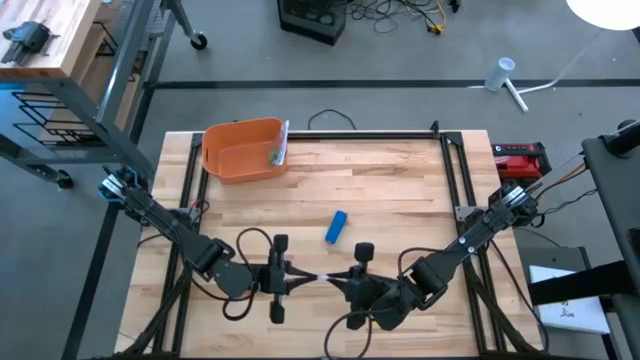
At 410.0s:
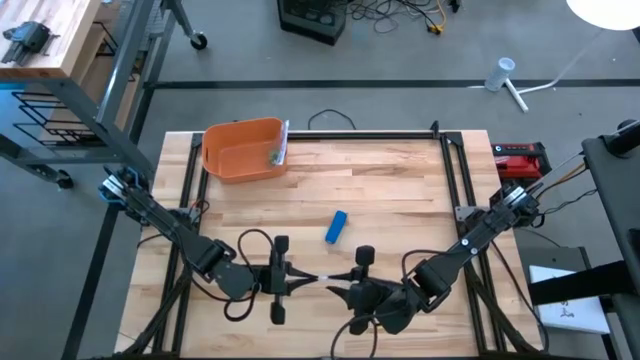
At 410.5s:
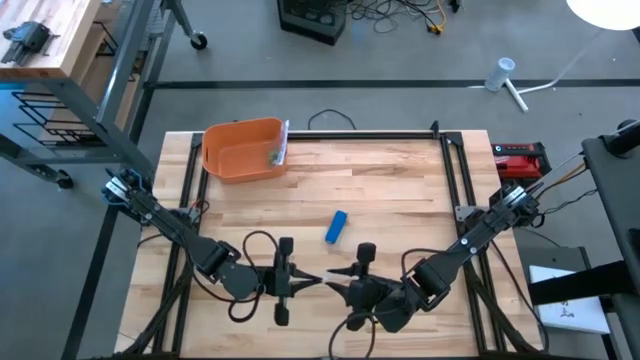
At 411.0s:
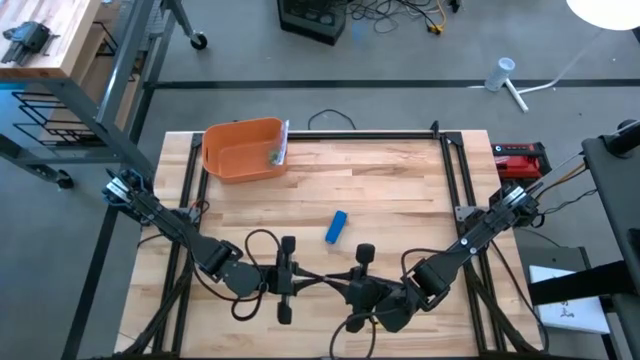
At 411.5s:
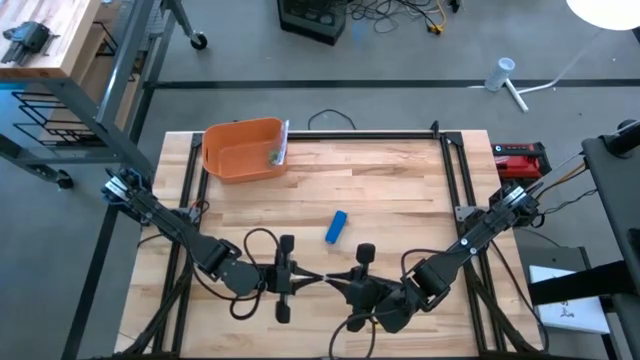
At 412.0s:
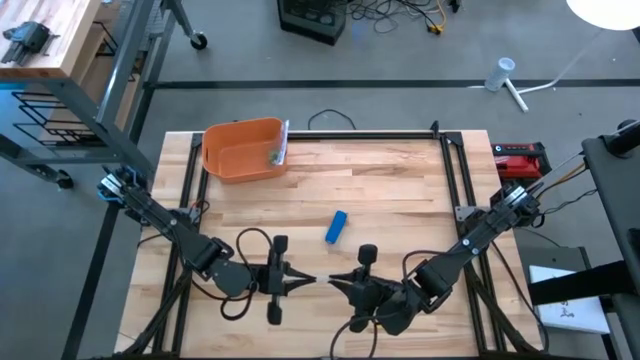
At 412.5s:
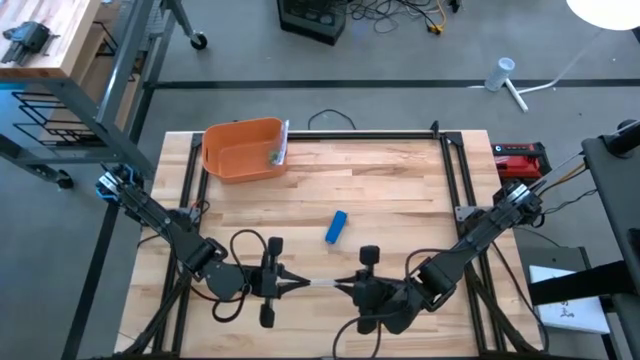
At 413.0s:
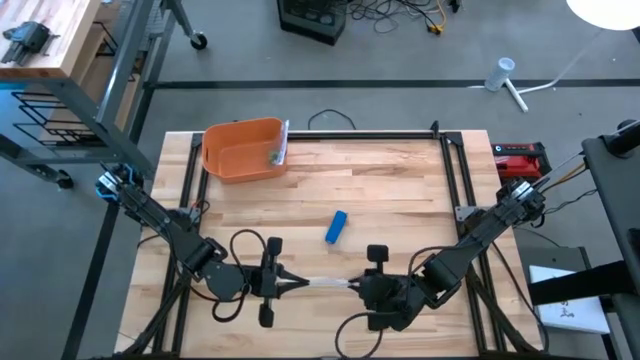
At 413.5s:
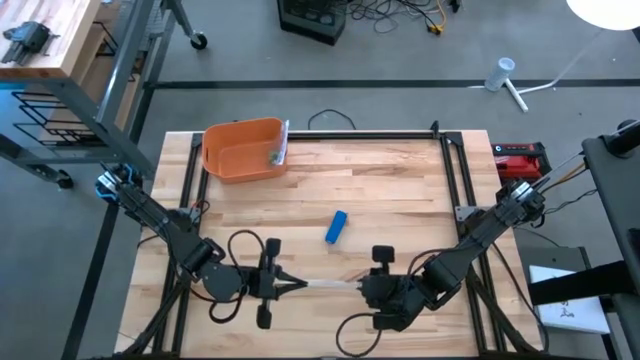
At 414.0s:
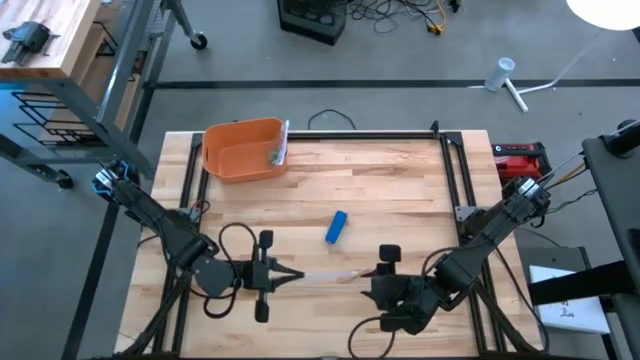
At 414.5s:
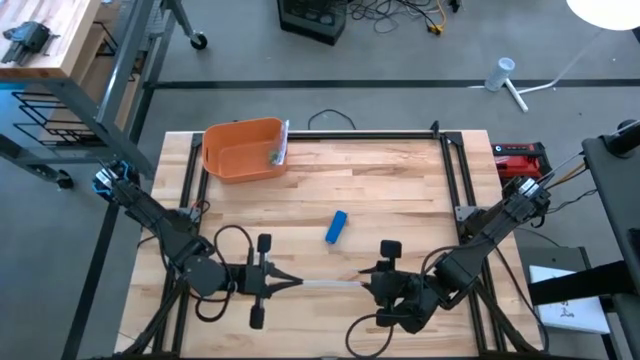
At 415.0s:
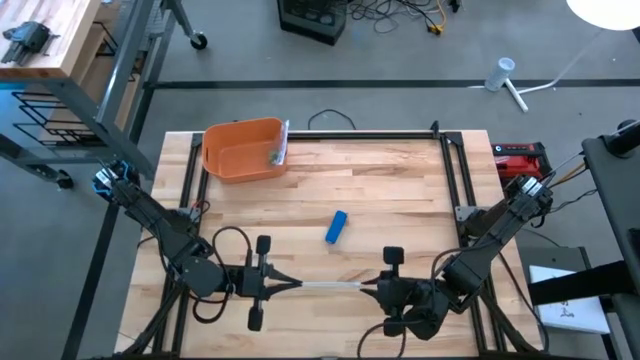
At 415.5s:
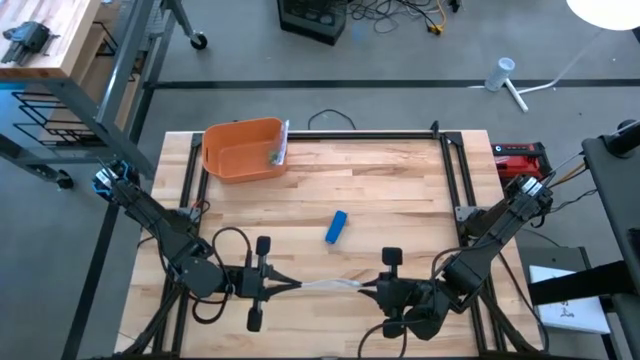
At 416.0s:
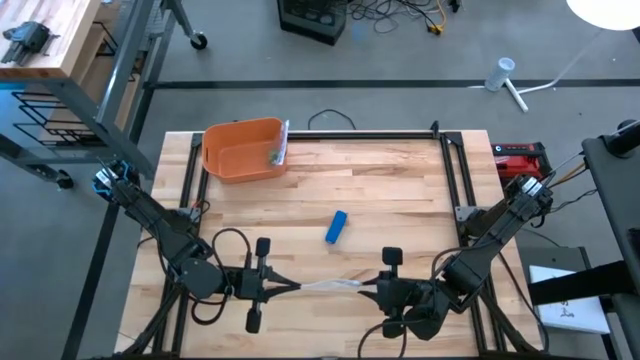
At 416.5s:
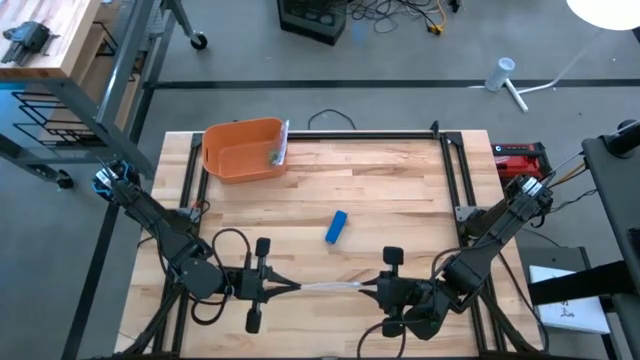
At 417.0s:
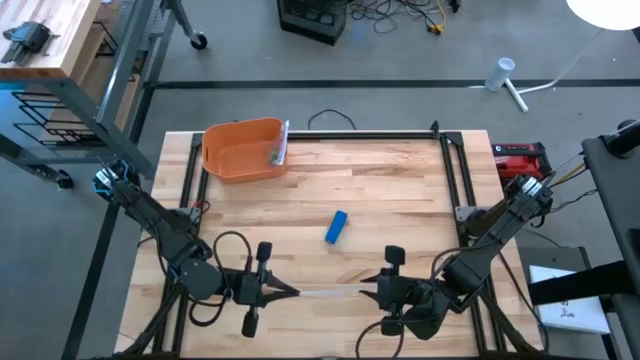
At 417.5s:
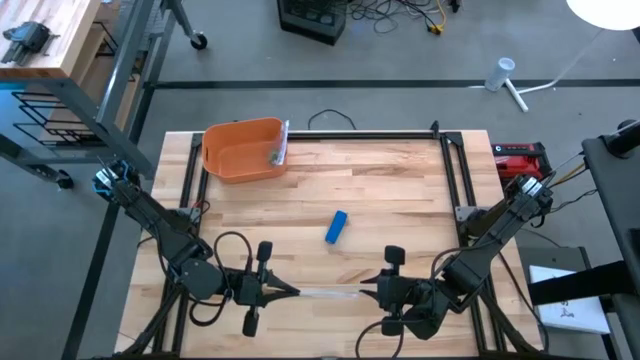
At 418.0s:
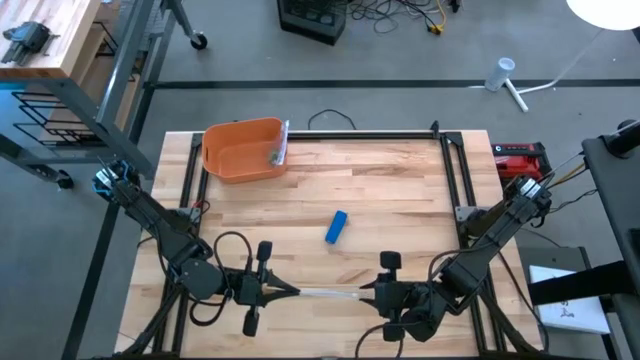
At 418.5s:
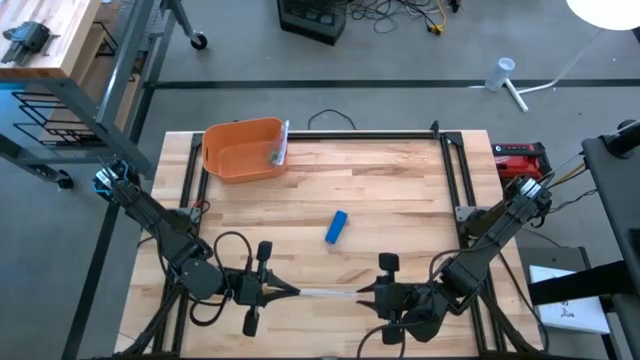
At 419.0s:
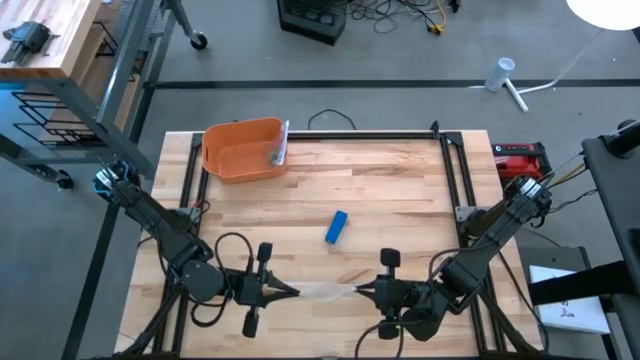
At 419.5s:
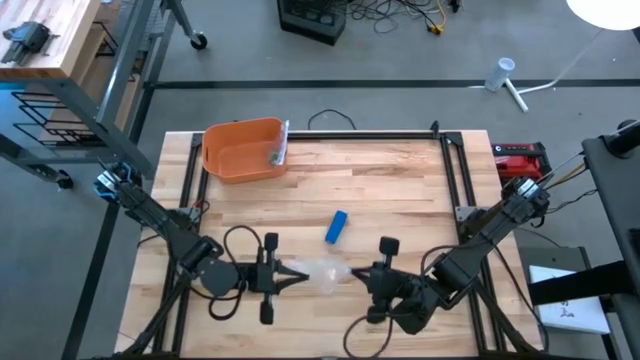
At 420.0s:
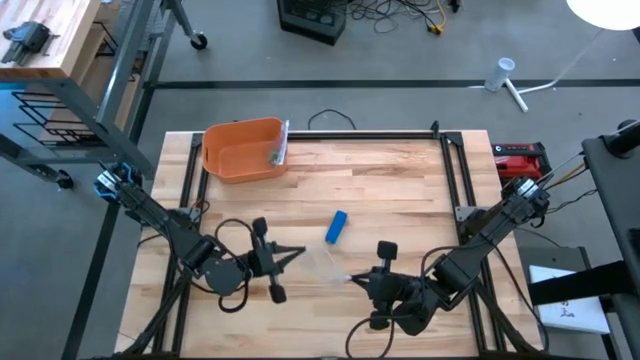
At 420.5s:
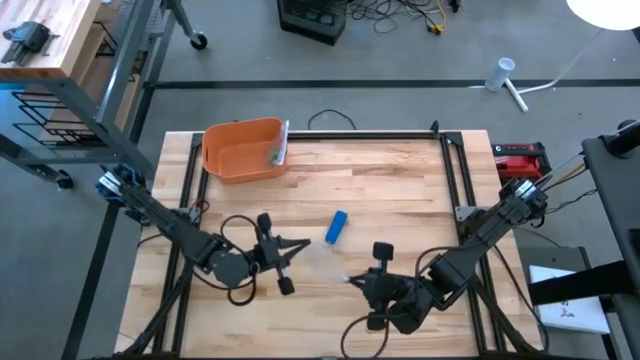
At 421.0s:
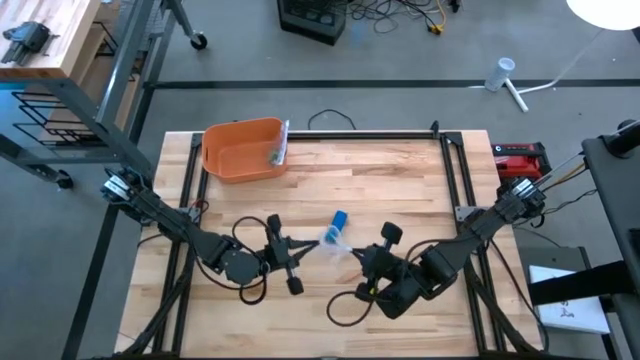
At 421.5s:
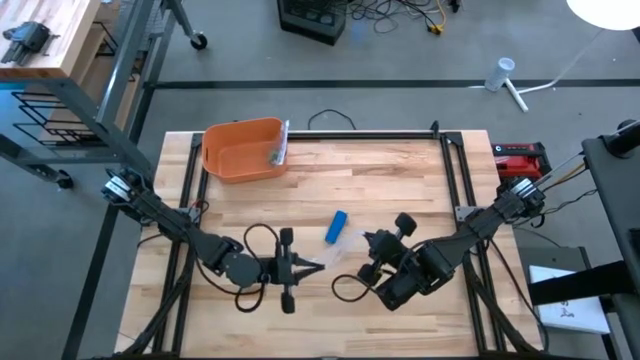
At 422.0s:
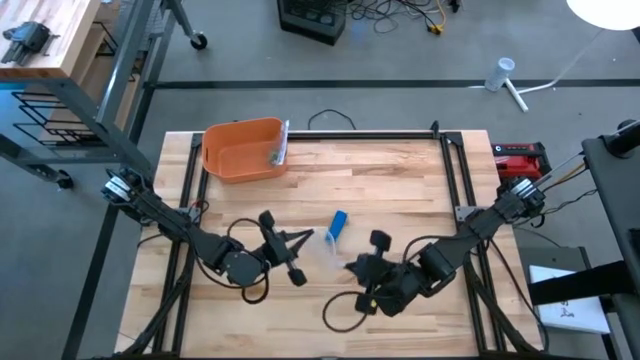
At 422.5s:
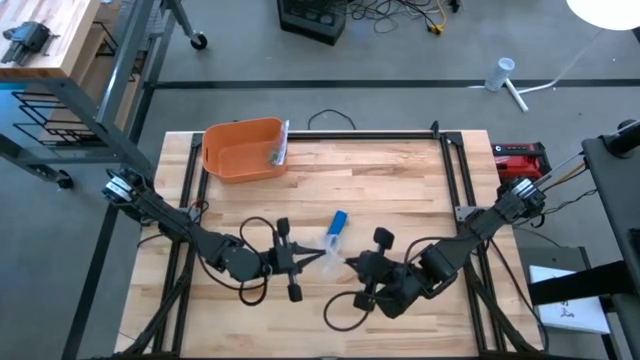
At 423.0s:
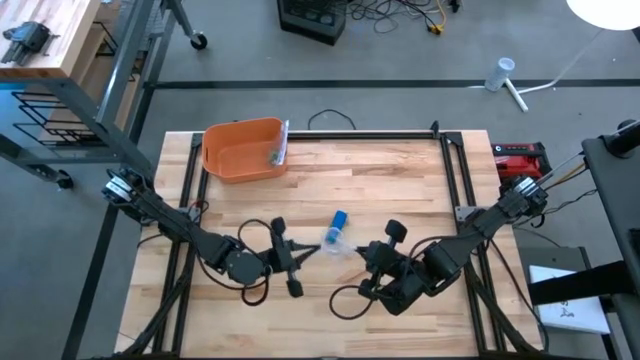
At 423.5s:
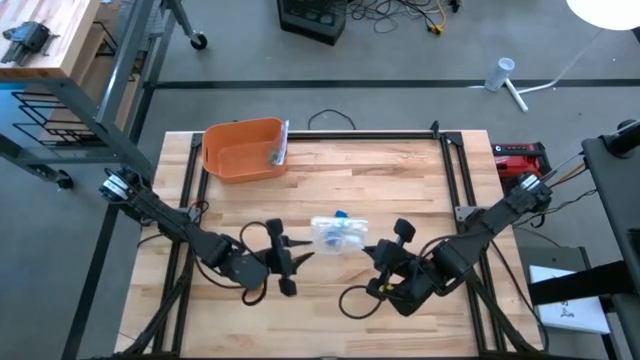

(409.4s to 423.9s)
Task: Roll bandage
Open the transparent zip bag

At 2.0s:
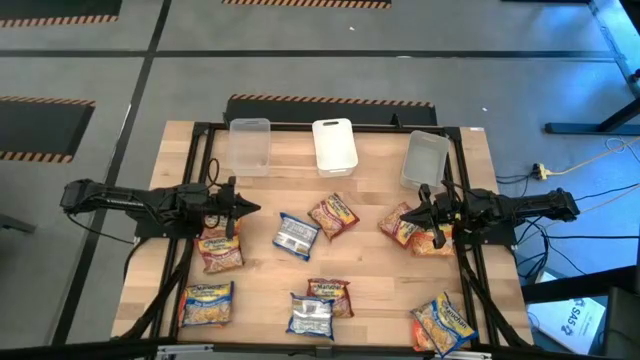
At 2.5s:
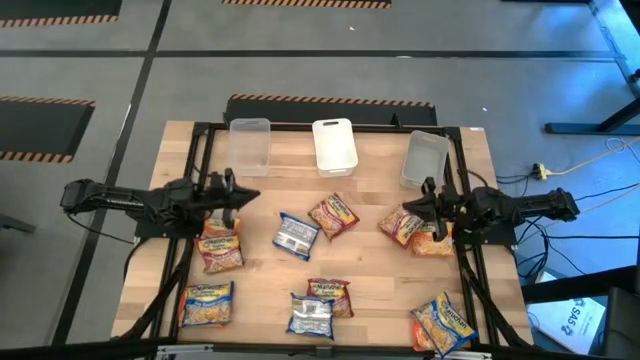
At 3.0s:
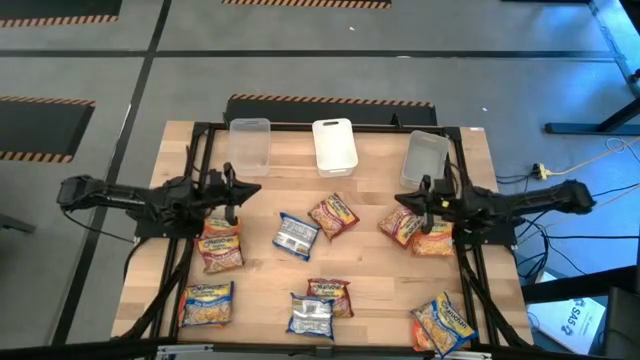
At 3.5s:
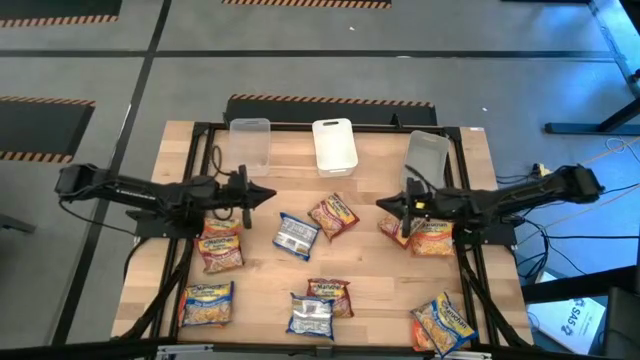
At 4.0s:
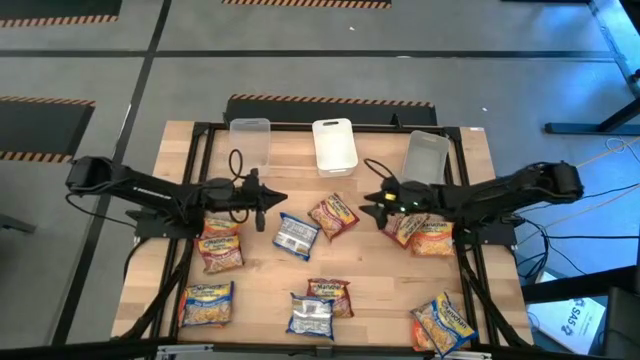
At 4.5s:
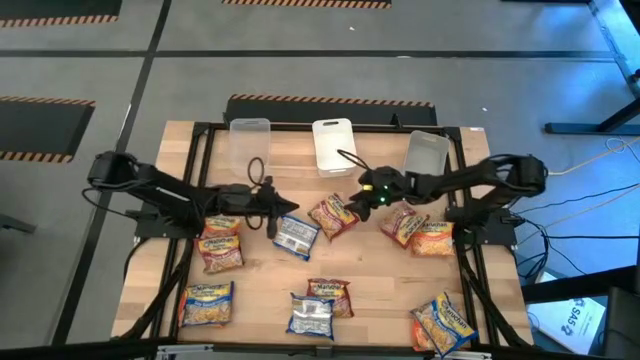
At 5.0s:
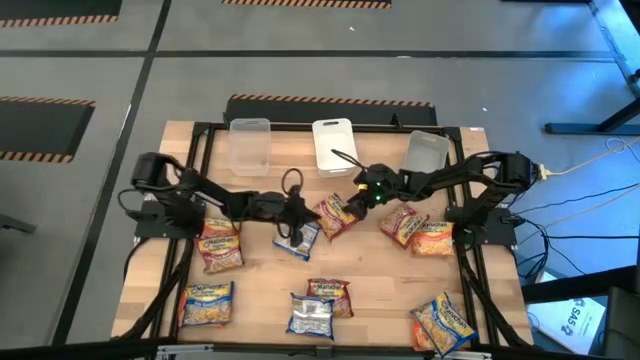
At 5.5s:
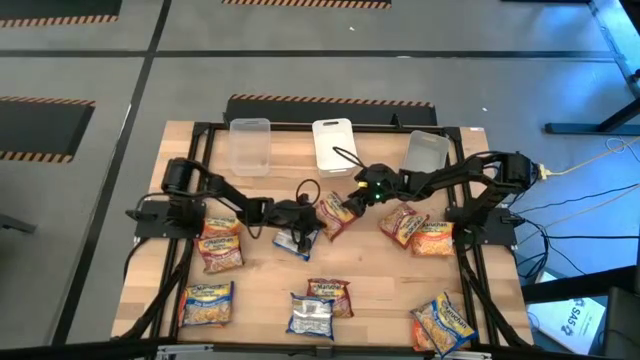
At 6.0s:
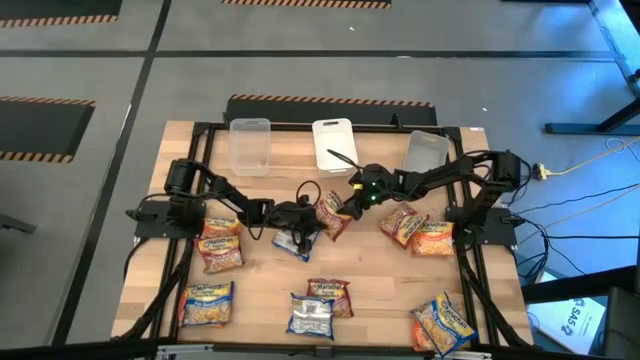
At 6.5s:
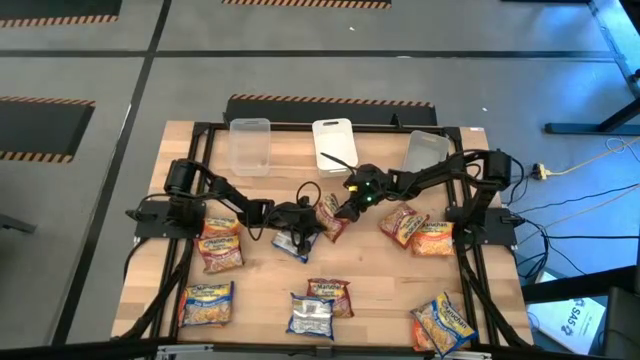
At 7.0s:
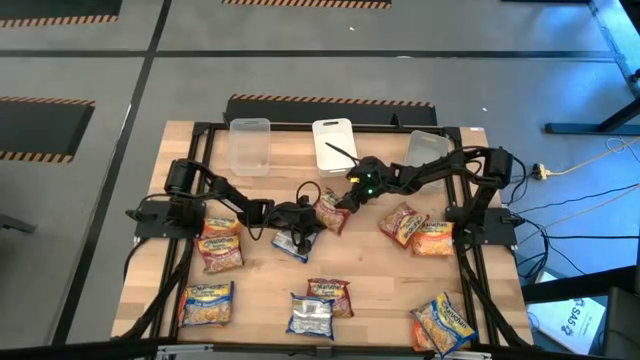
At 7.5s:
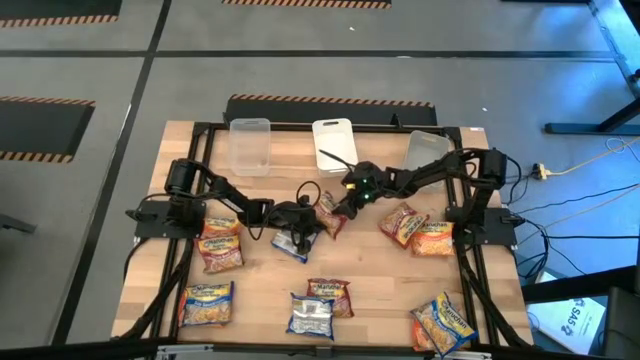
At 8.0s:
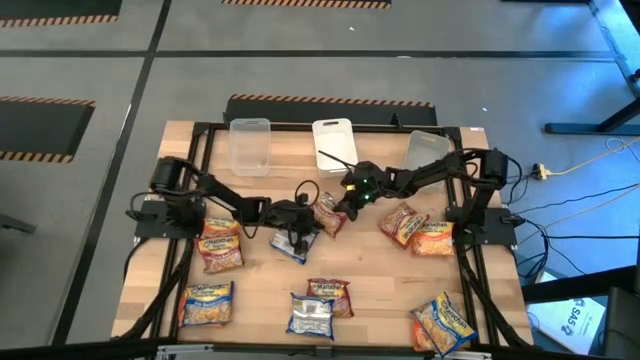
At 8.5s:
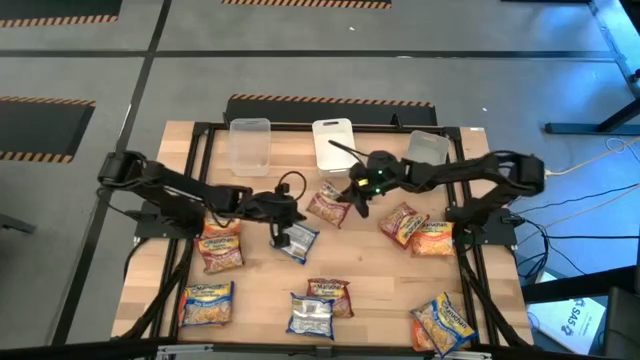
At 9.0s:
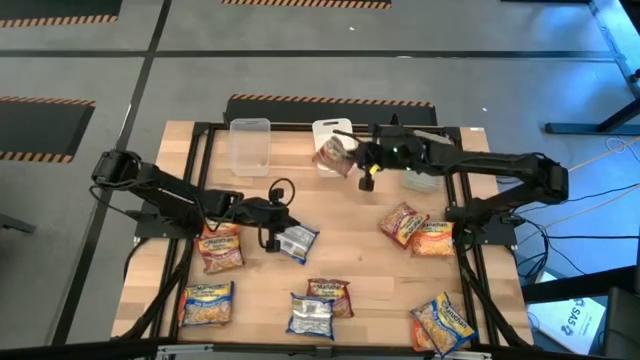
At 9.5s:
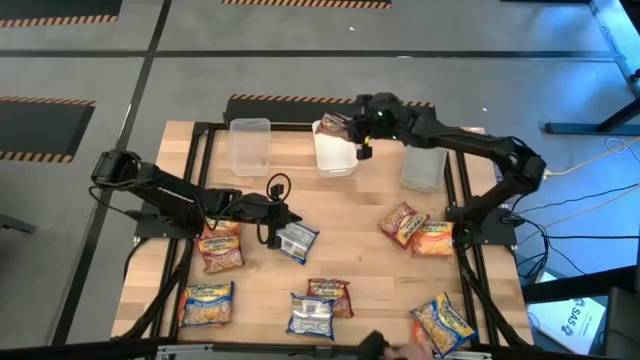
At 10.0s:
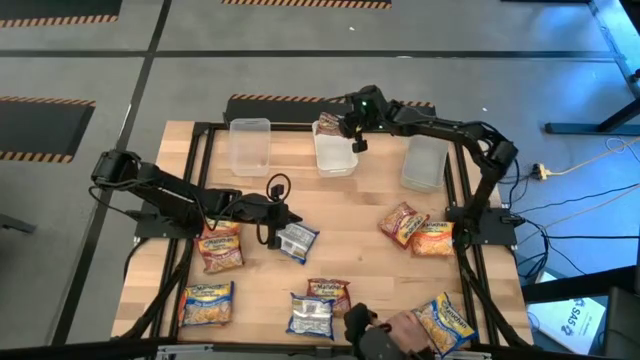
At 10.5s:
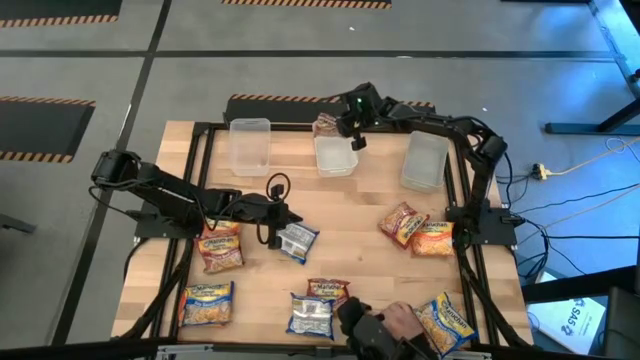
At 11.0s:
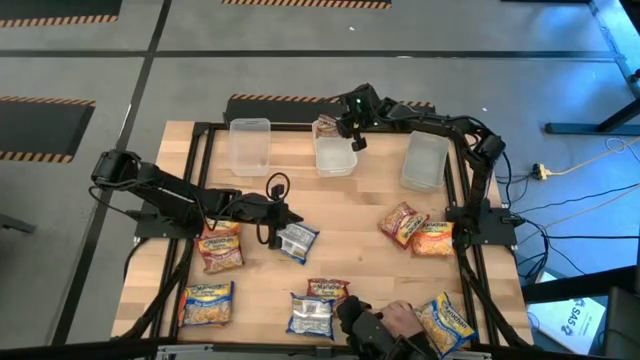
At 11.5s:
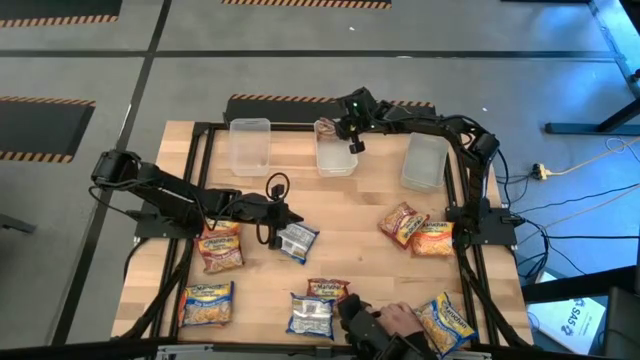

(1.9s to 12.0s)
Task: Sort Maruchan noodles
Put the red noodle pack into the white bin
